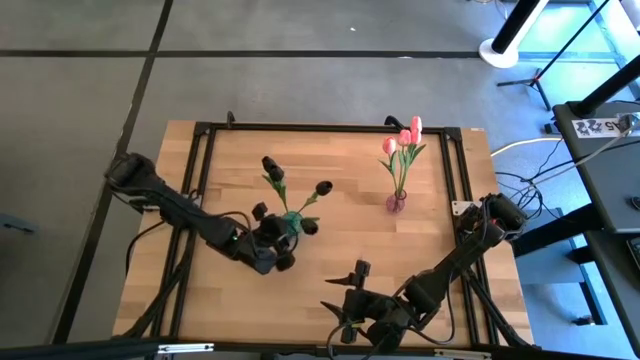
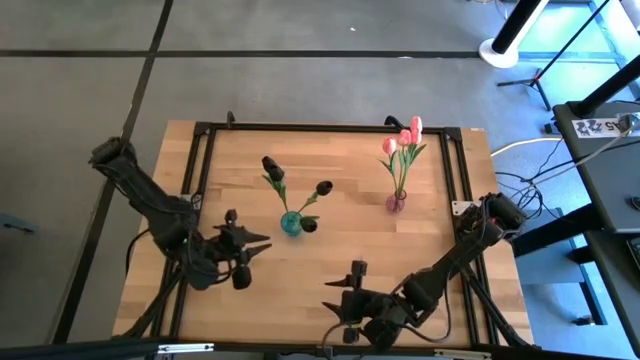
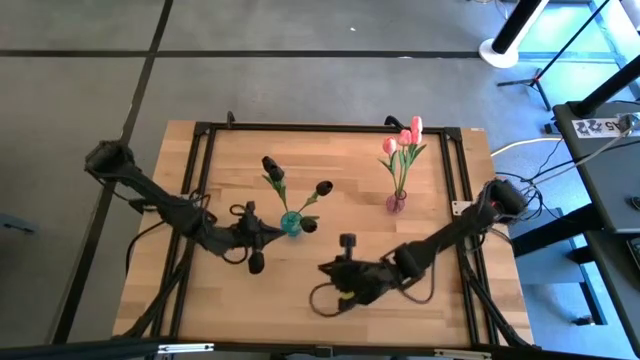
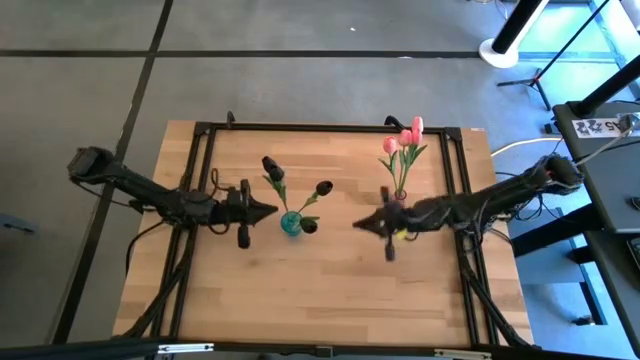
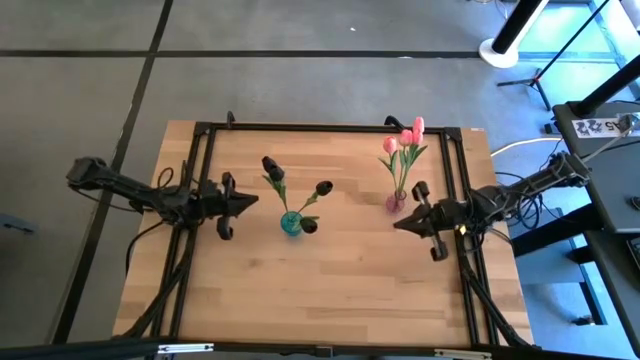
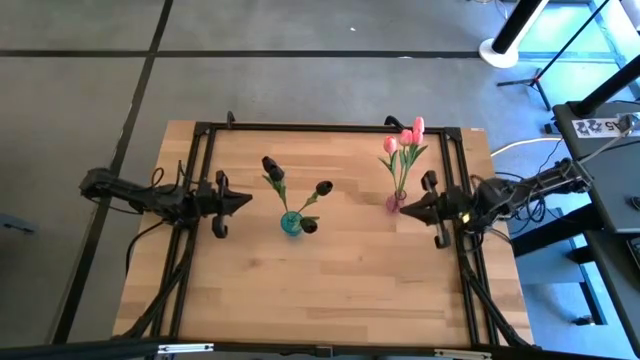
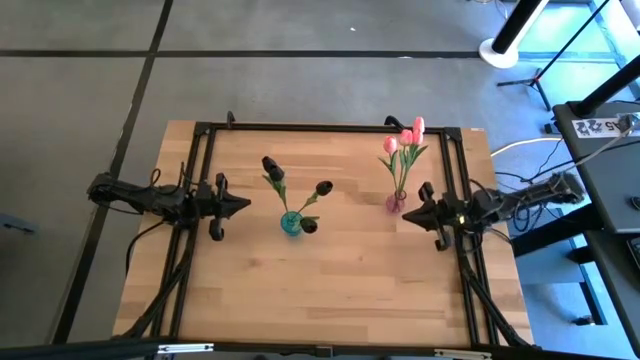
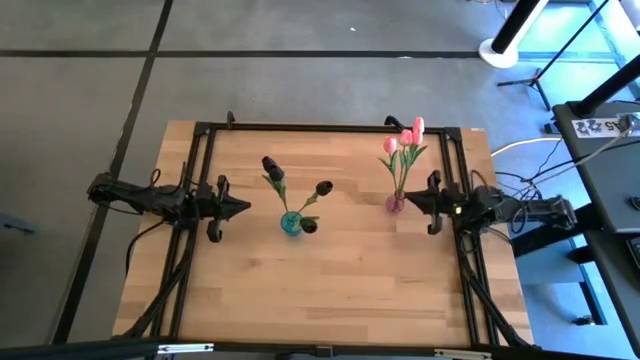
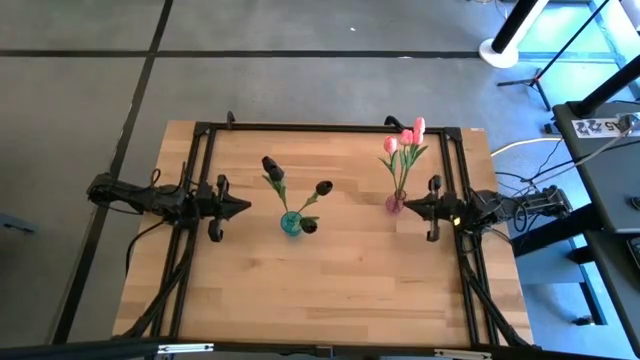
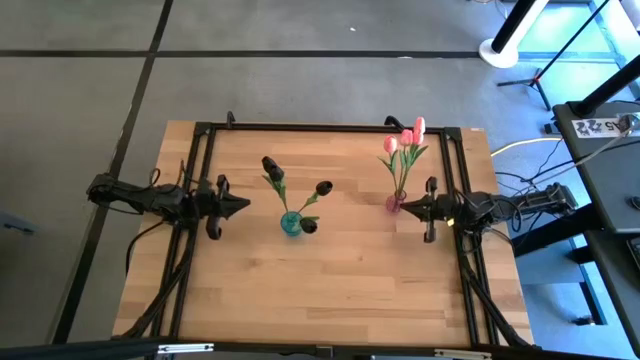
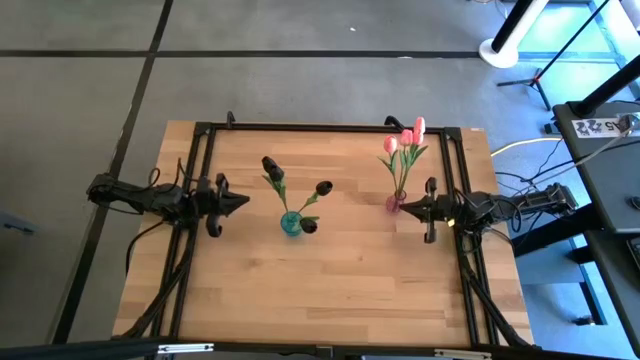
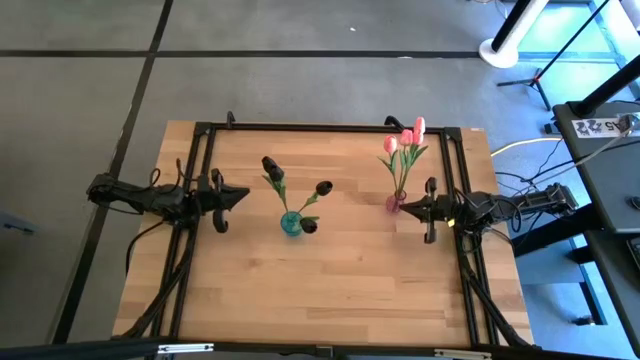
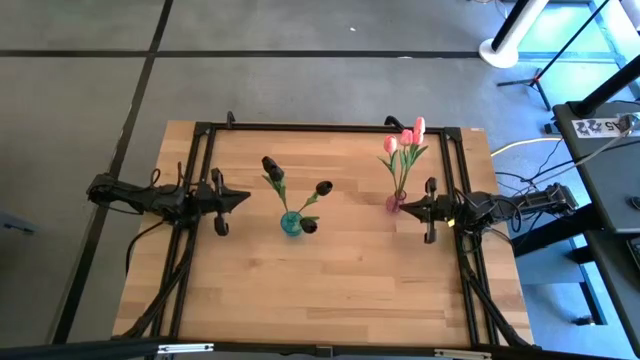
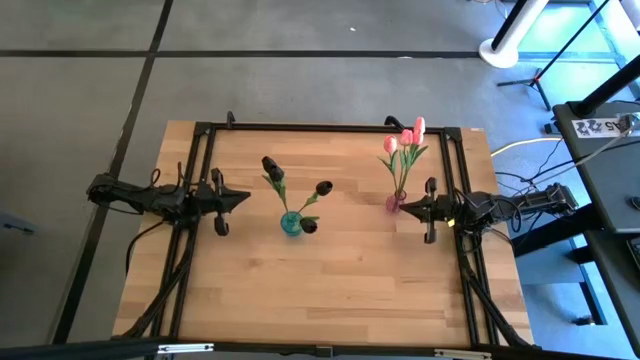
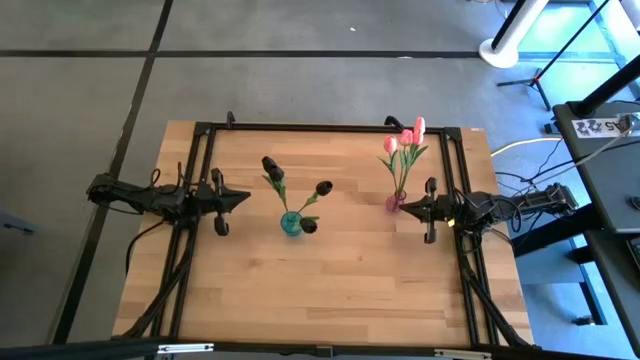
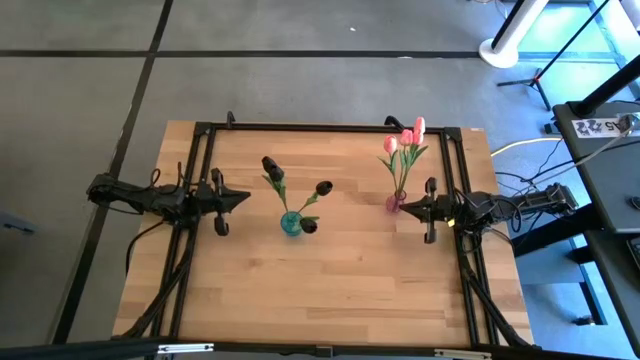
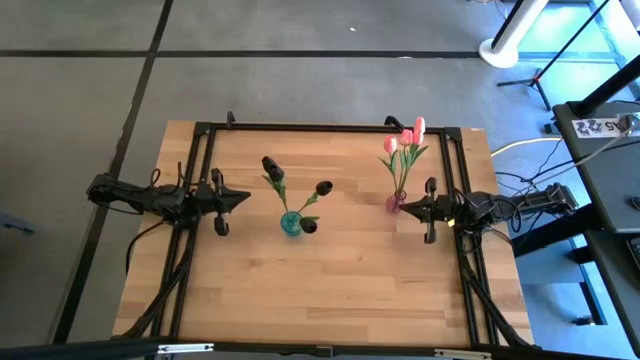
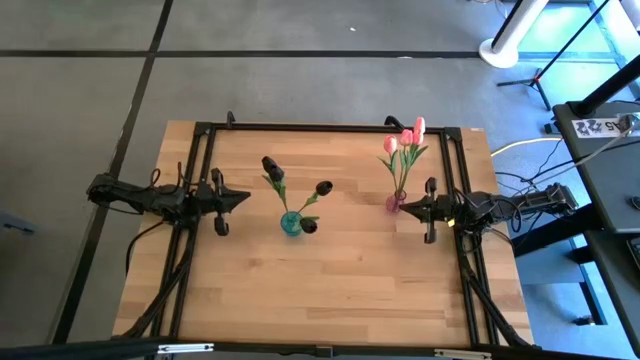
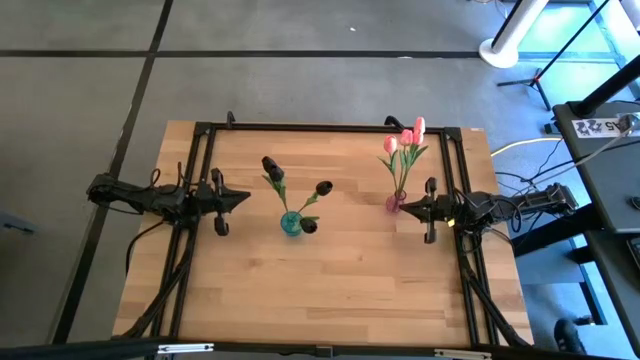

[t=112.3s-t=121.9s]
Task: Sort flowers into vase by color
Return to Home Position

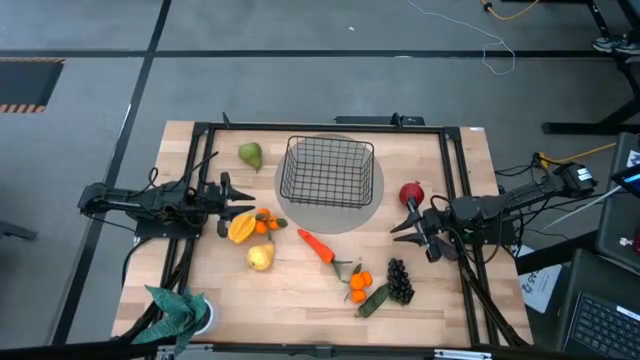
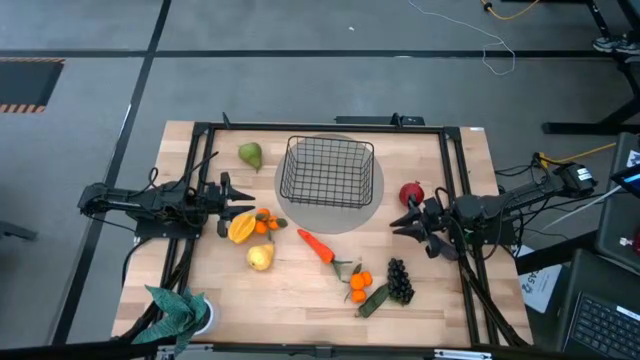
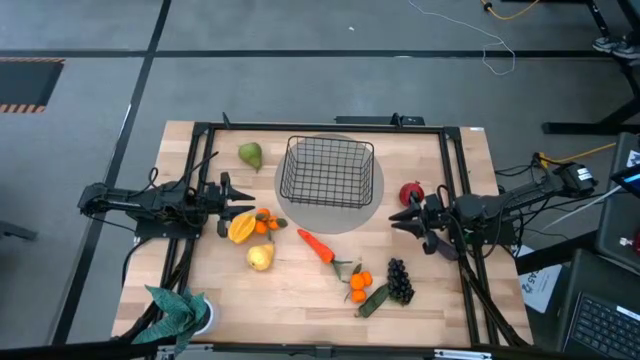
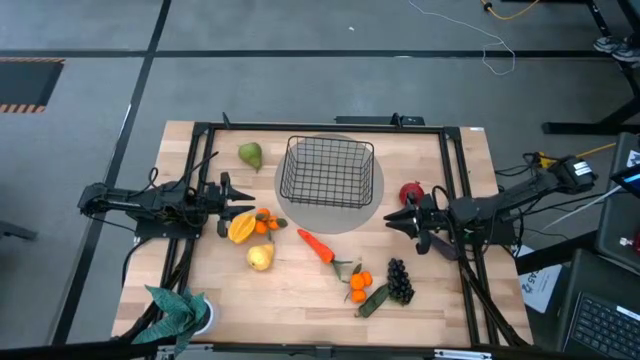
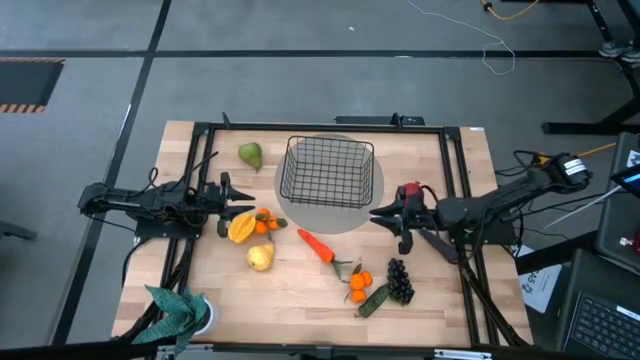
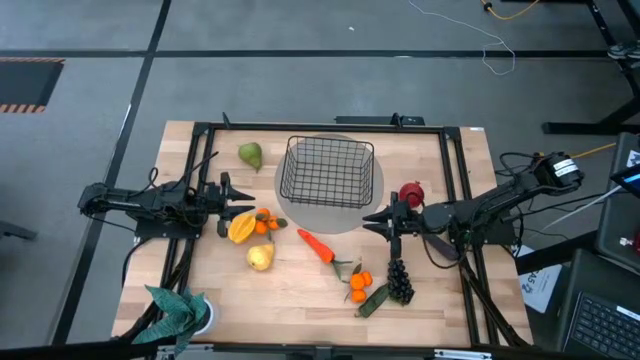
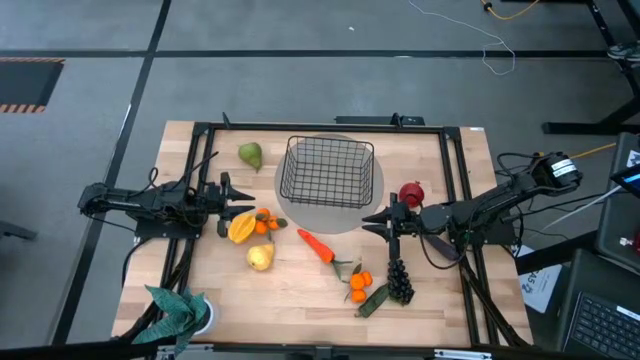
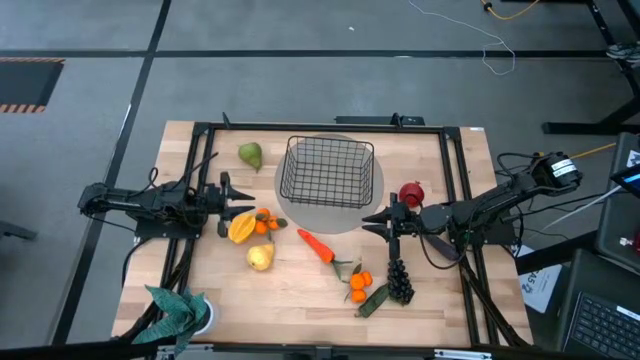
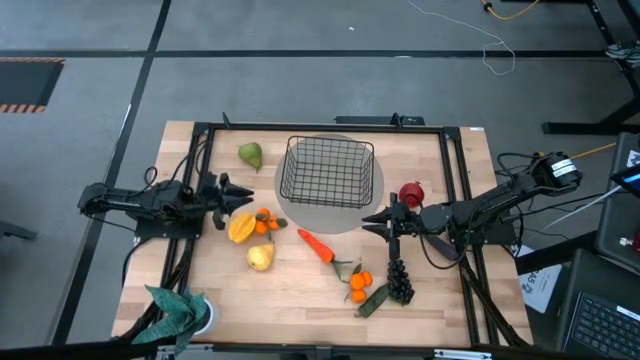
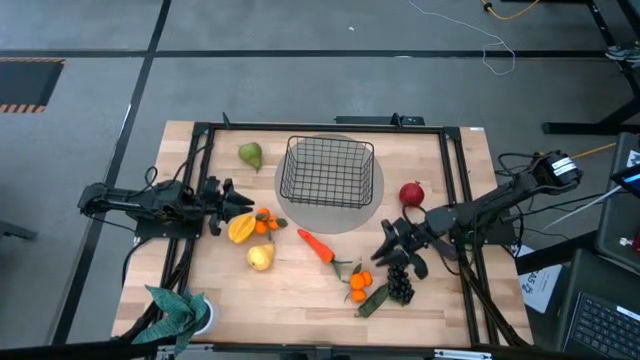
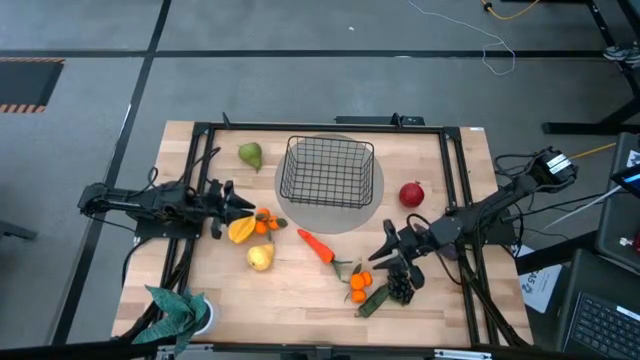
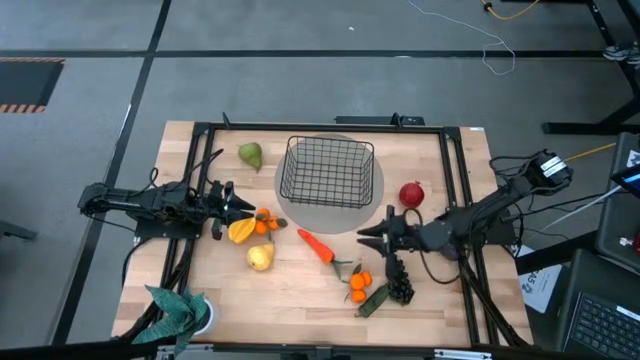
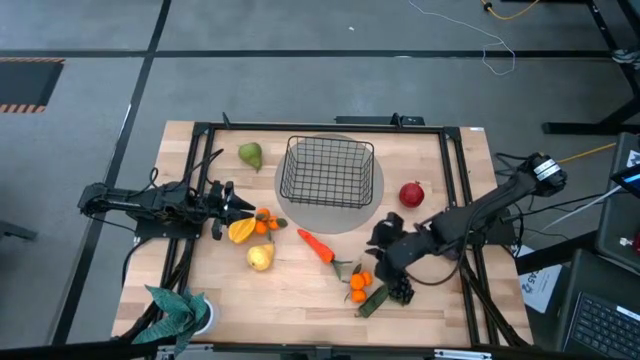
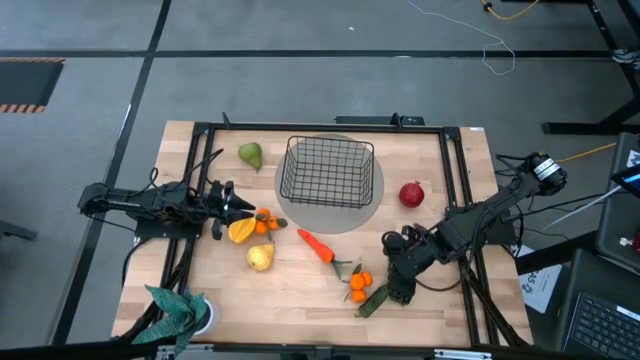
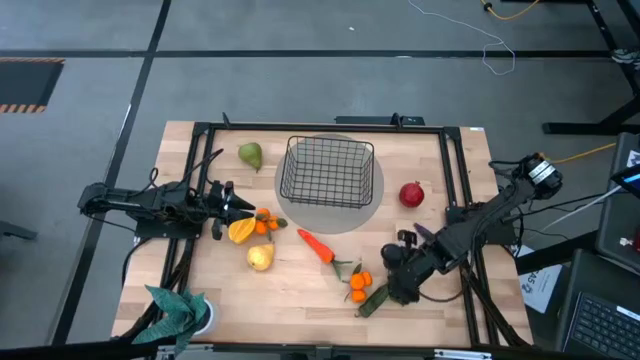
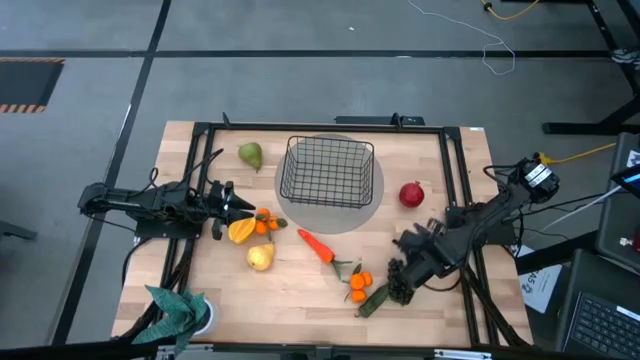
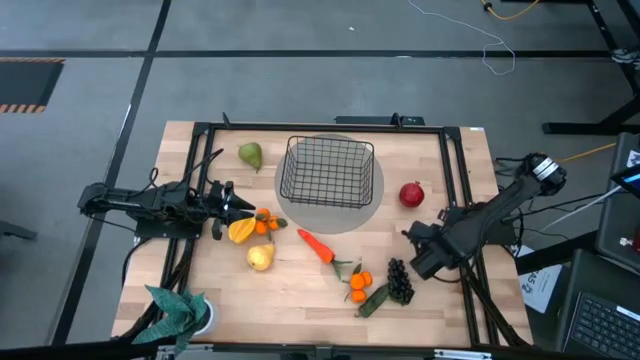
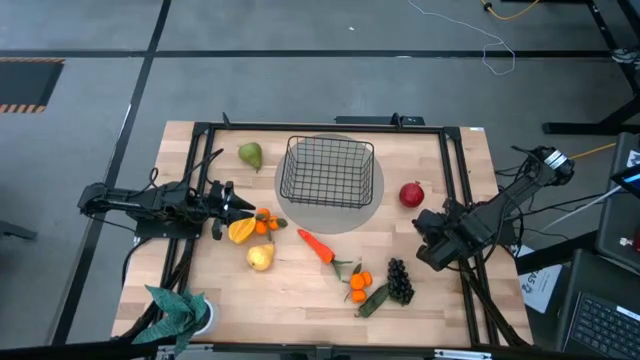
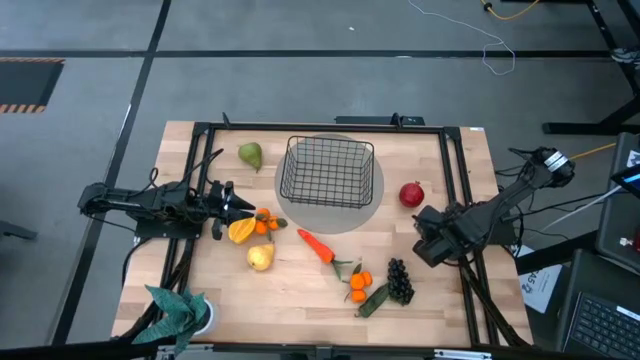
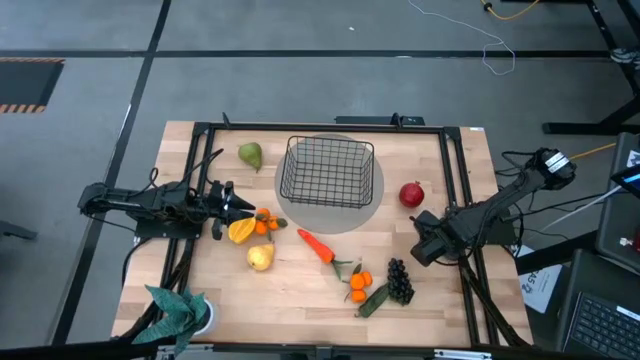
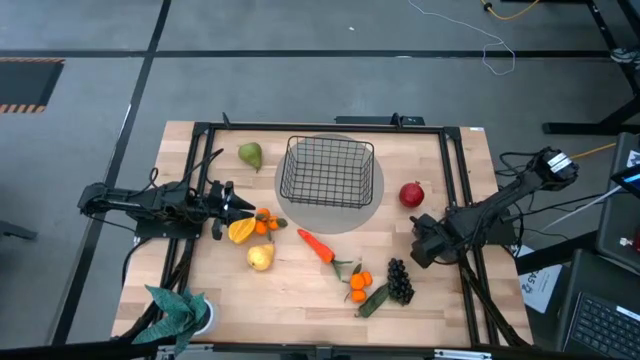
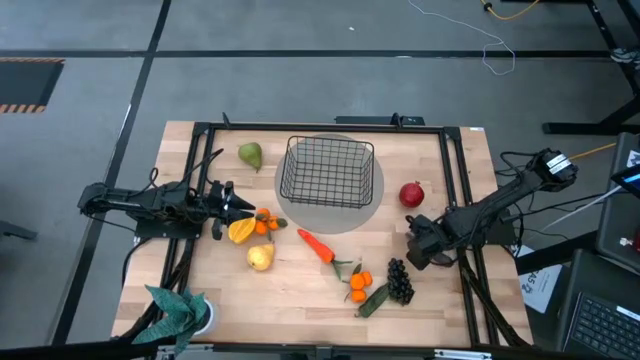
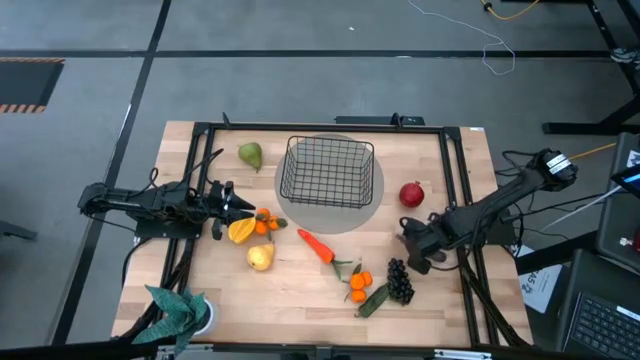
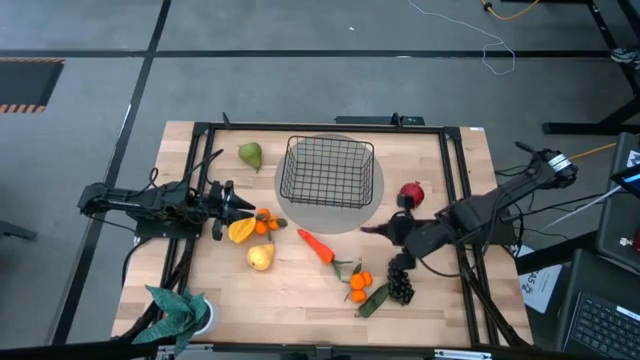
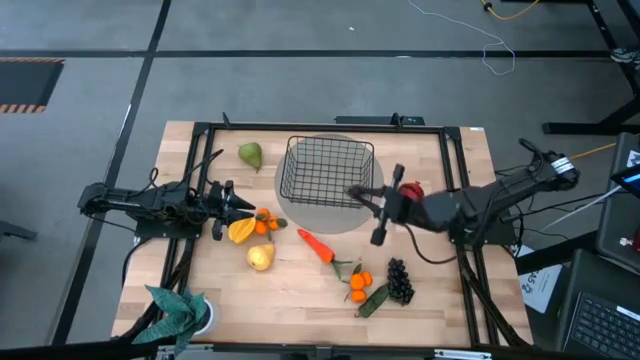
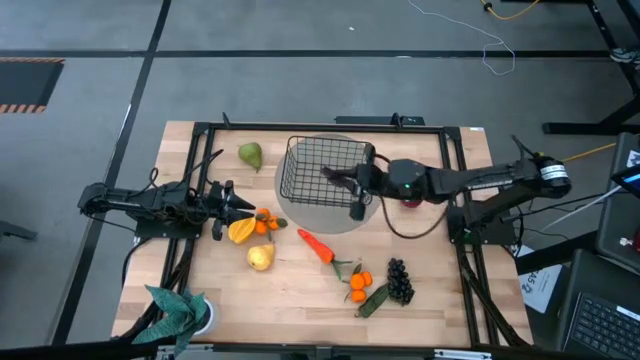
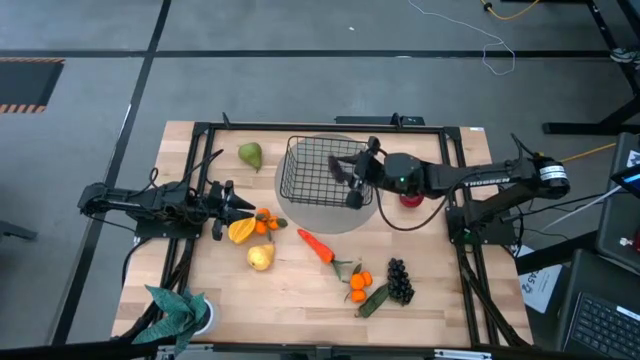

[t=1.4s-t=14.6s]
Task: Build produce basket
Put the violet eggplant into the black wire basket
